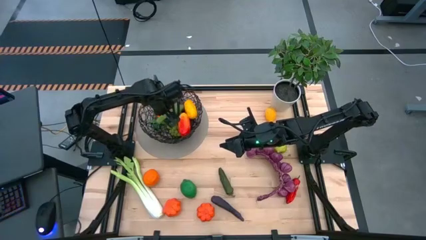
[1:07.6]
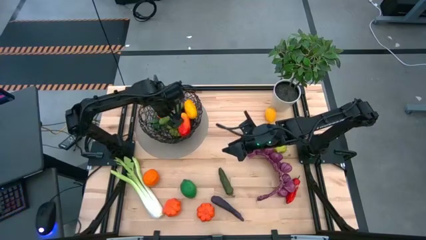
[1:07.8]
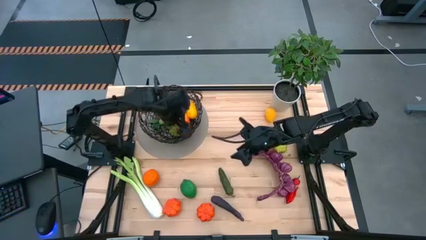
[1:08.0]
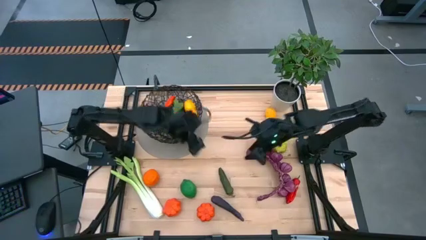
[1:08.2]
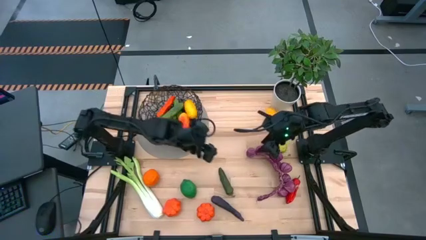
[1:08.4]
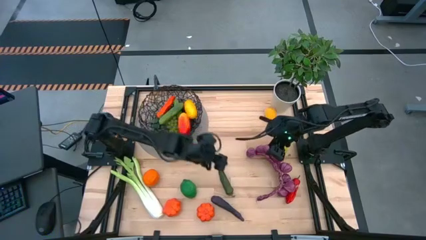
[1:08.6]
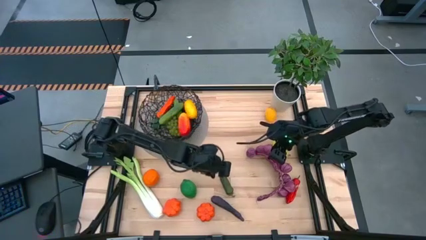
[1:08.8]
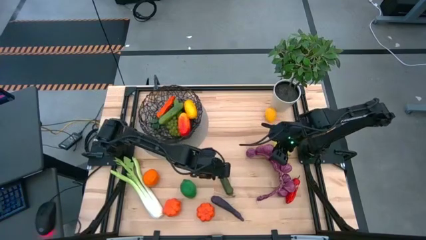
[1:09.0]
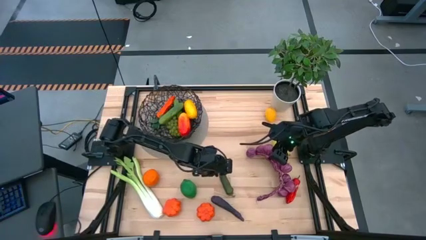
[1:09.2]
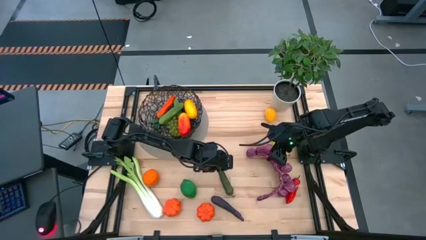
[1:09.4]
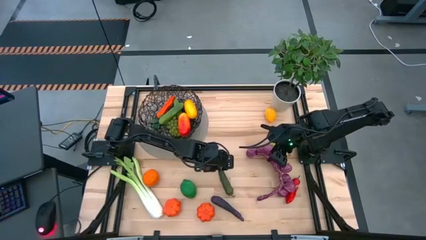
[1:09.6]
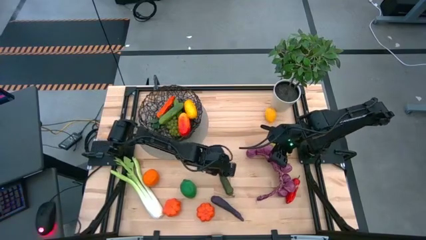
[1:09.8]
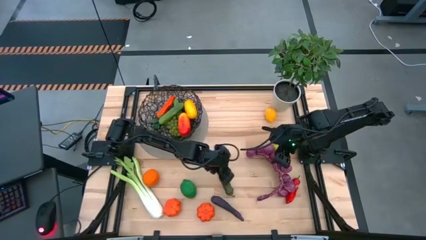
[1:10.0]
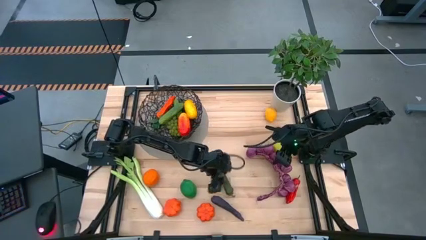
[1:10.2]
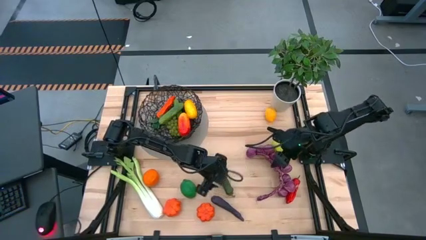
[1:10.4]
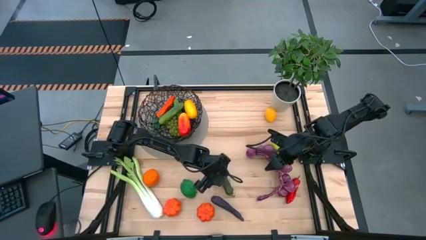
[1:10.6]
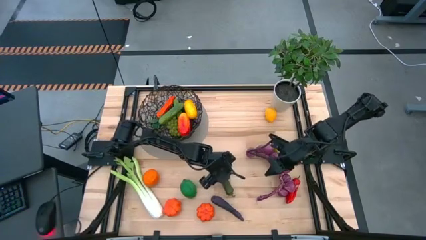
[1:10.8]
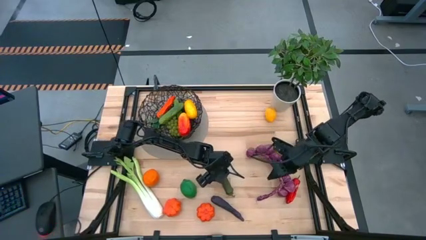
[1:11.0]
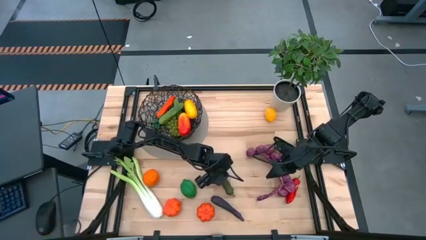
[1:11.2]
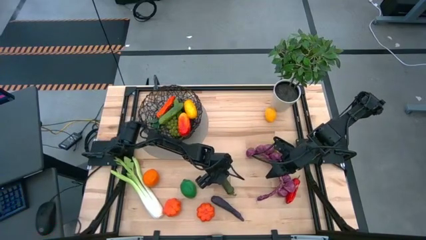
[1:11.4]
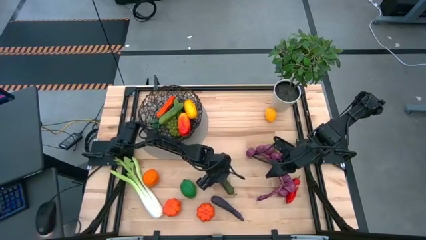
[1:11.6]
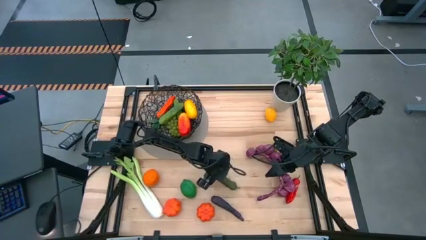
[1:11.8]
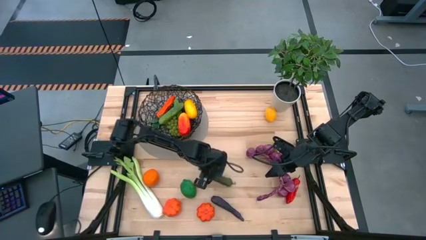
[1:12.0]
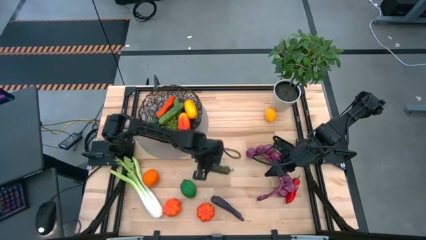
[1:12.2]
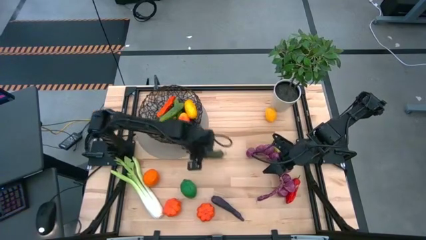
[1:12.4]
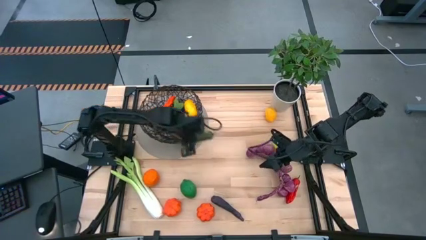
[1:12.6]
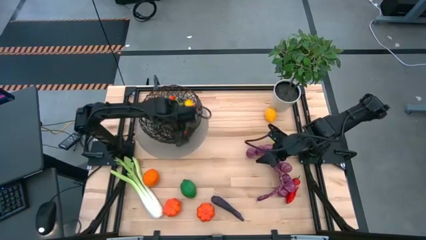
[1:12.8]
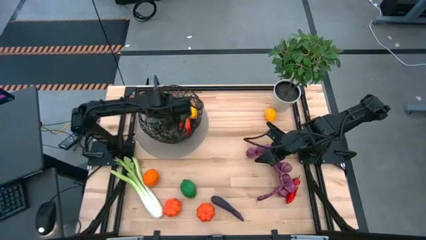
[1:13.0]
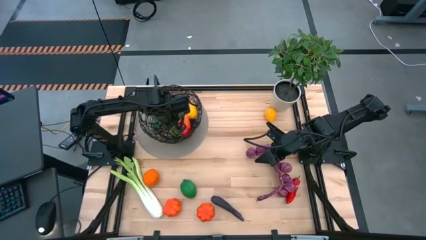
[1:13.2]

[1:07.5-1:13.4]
Task: Build produce basket
Put the green chili pepper into the black wire basket

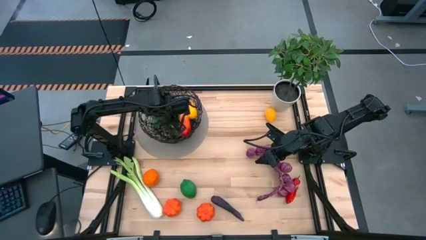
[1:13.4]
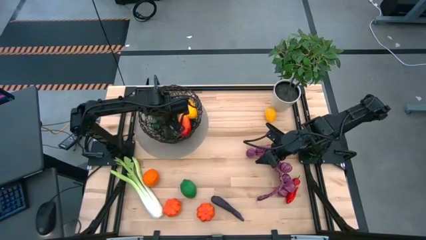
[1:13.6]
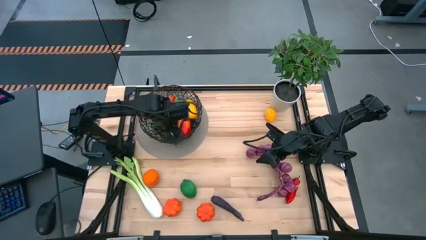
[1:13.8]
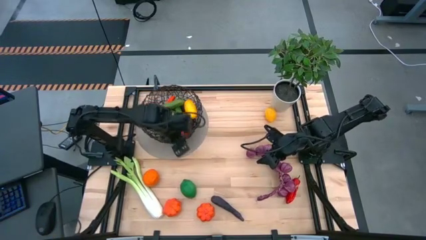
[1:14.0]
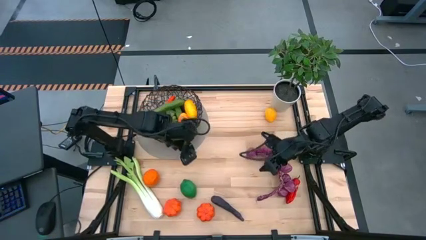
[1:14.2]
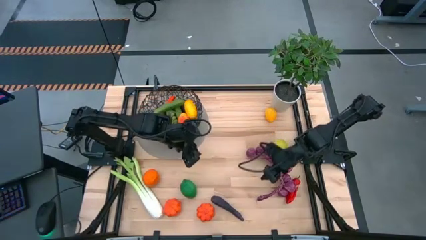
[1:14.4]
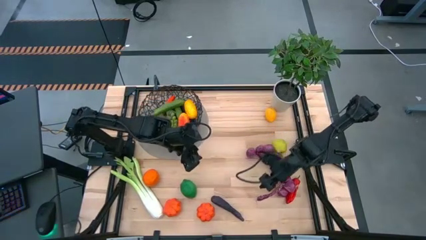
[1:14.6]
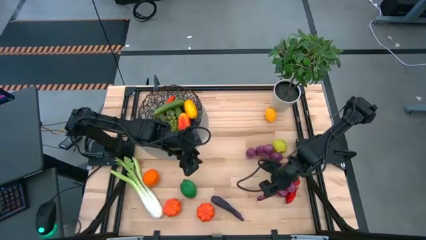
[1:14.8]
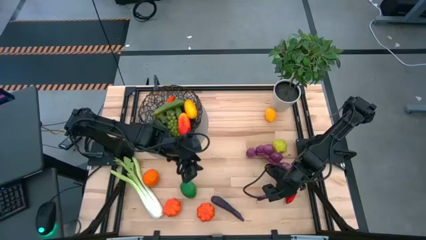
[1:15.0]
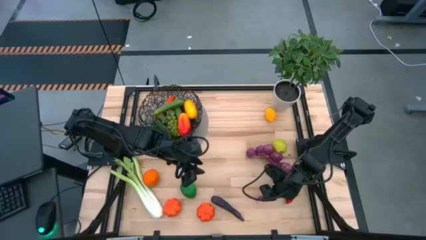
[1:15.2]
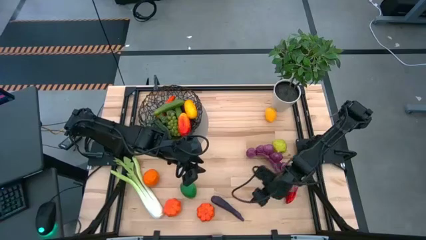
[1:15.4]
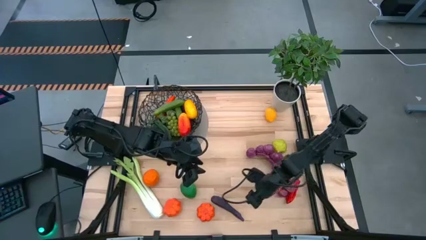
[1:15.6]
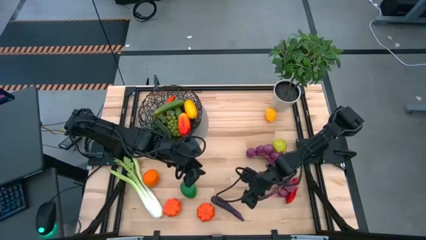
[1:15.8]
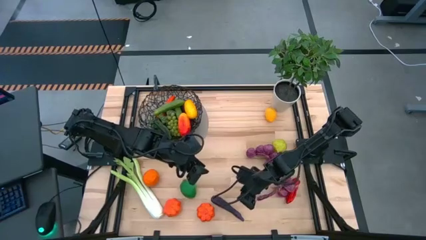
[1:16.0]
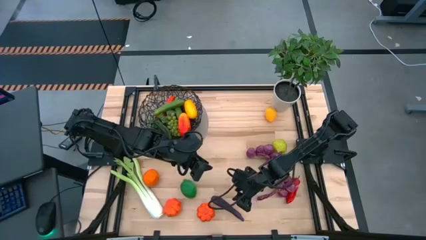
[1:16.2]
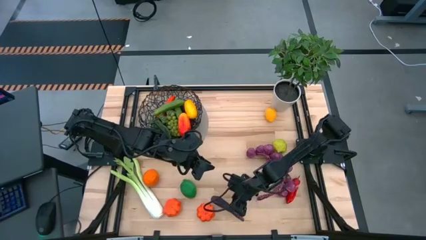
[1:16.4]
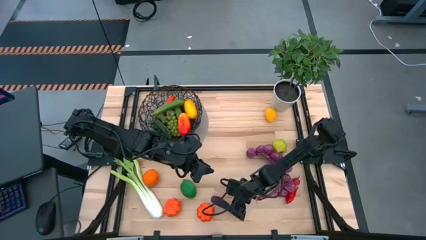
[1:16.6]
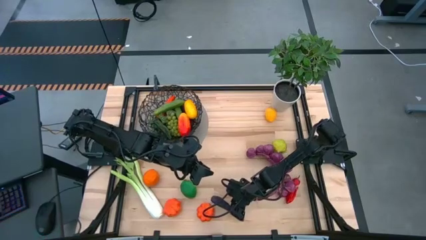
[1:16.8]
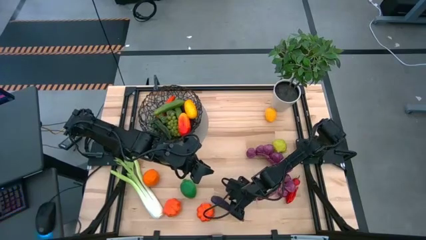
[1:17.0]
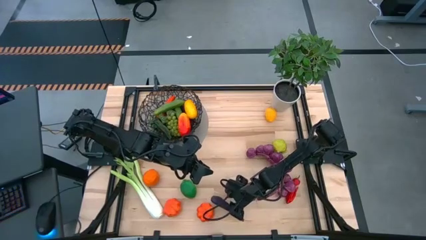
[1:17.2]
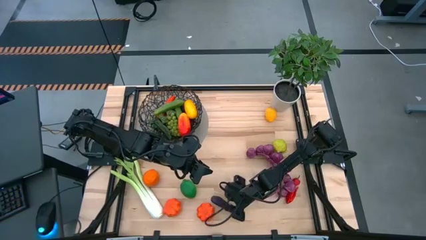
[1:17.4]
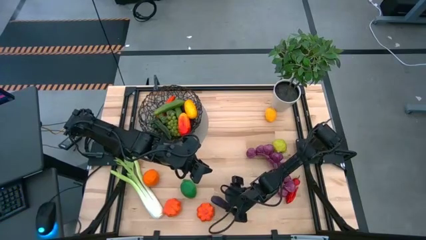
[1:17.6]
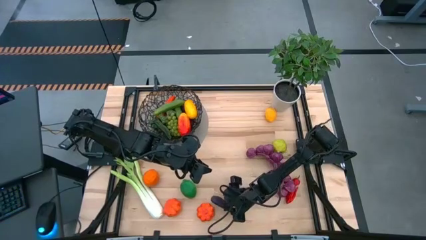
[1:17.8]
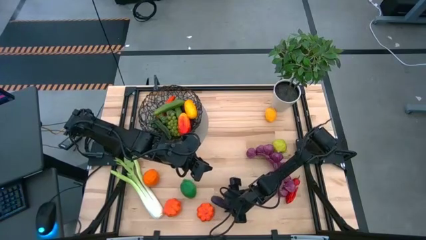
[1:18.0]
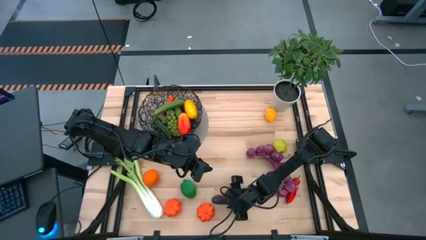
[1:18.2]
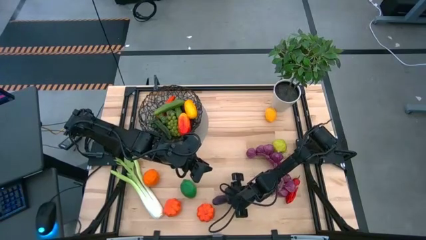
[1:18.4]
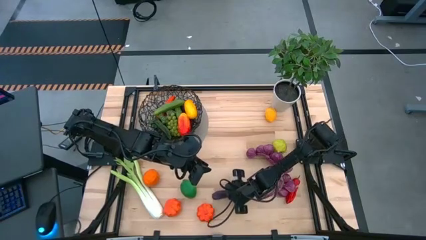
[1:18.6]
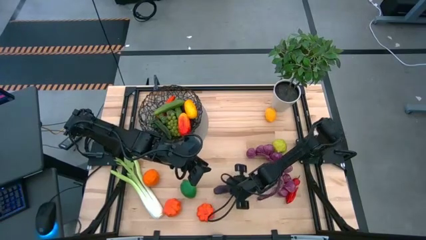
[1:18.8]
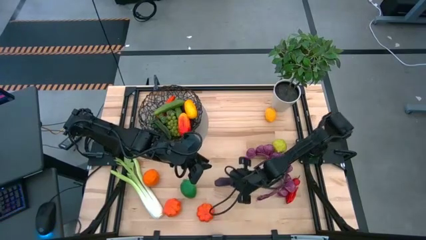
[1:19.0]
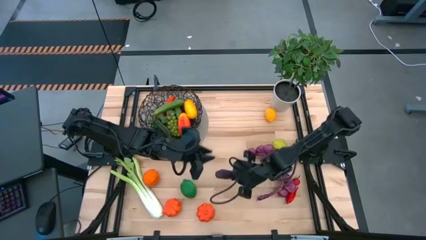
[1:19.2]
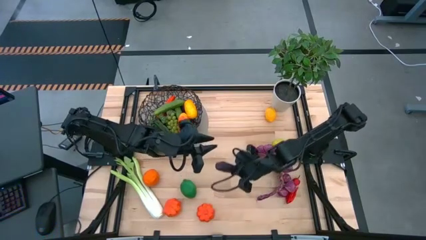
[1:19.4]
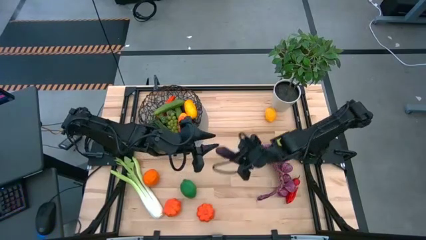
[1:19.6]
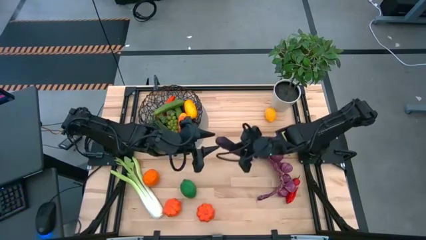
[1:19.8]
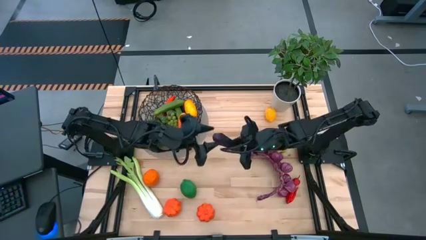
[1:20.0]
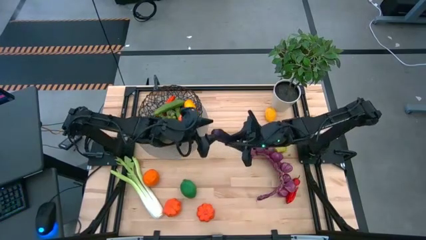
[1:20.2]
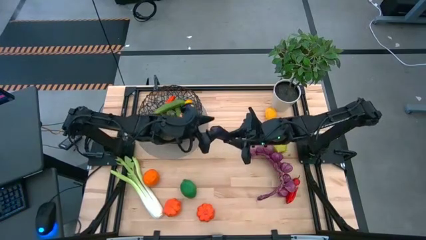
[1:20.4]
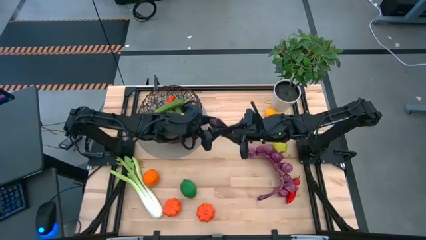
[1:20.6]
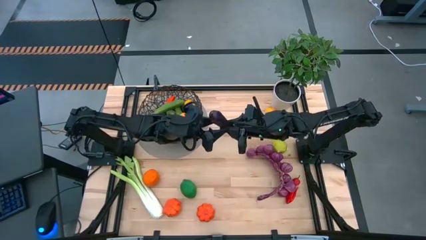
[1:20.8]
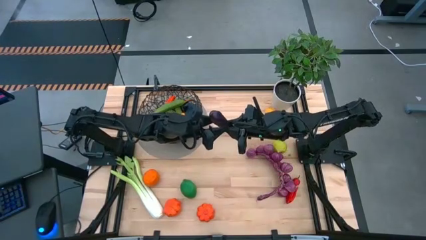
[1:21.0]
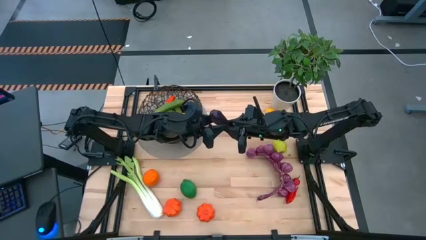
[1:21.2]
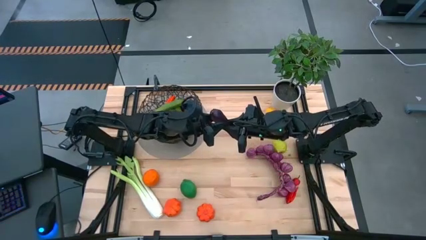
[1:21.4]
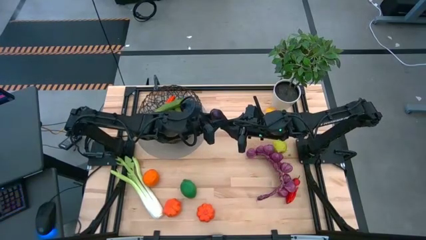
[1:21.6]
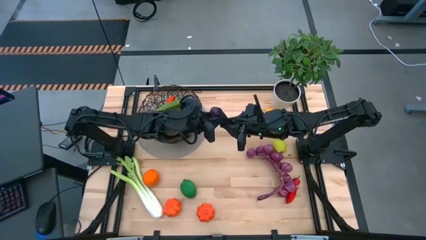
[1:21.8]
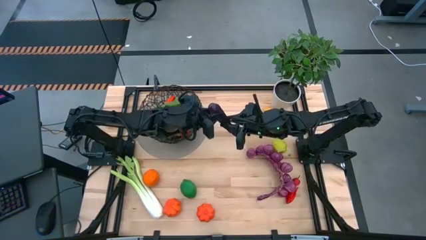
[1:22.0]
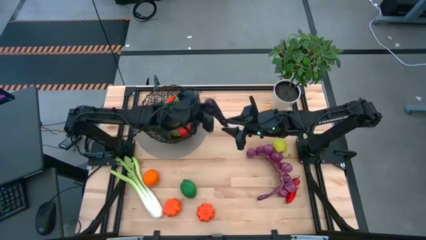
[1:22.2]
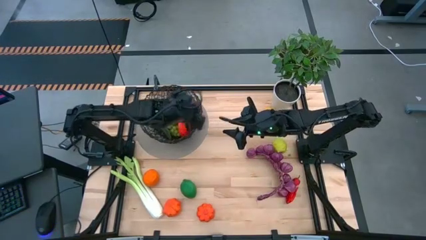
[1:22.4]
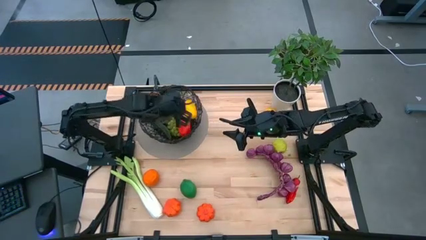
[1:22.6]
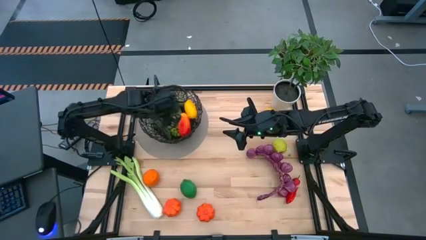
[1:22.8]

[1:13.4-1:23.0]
Put the purple eggplant into the black wire basket

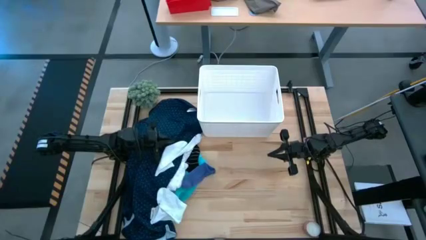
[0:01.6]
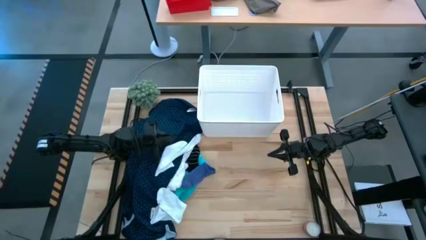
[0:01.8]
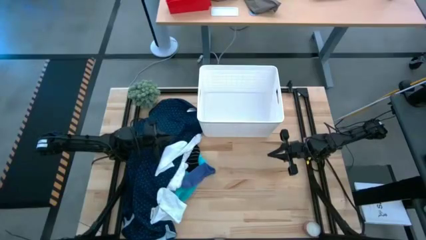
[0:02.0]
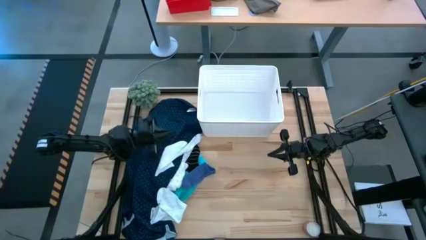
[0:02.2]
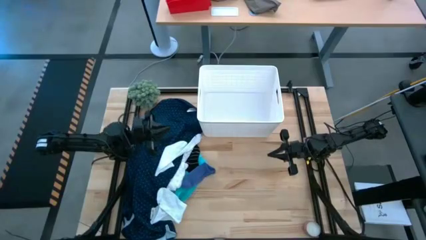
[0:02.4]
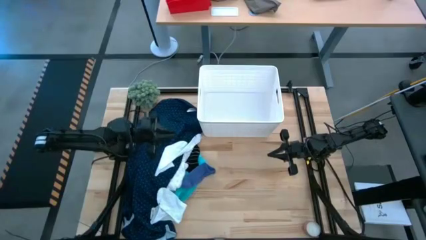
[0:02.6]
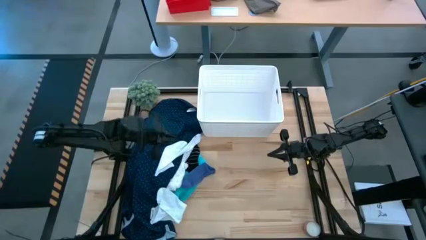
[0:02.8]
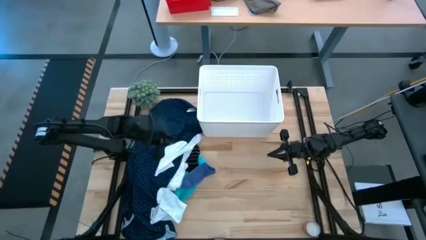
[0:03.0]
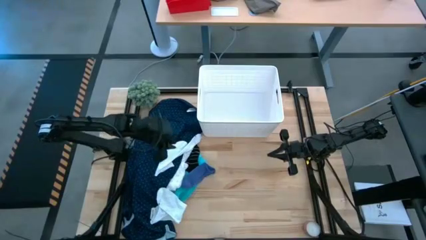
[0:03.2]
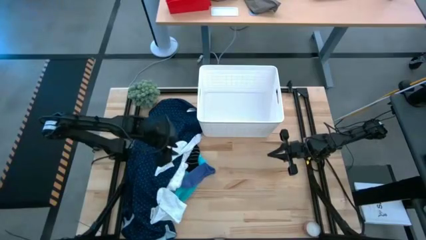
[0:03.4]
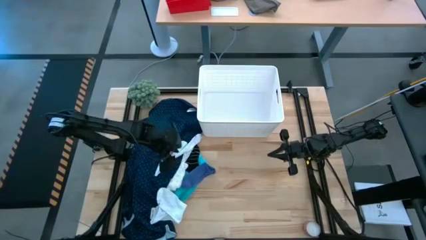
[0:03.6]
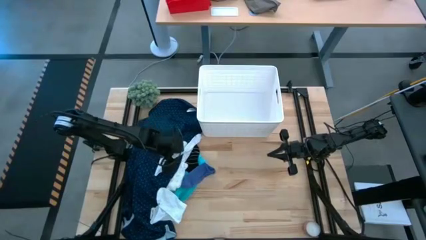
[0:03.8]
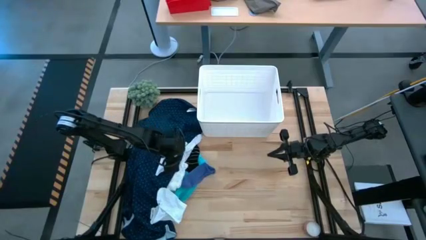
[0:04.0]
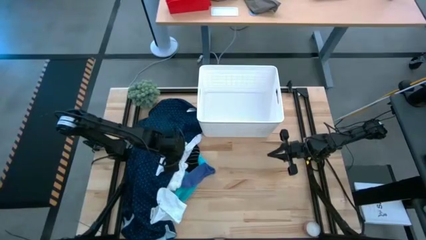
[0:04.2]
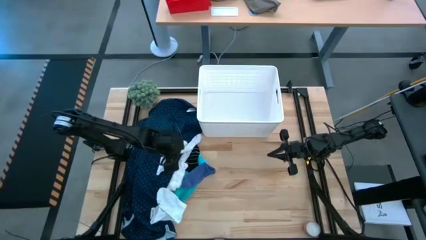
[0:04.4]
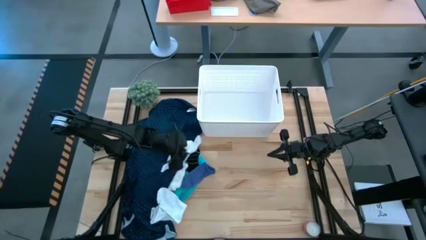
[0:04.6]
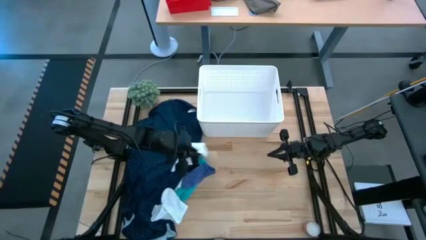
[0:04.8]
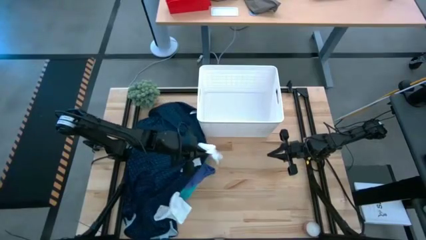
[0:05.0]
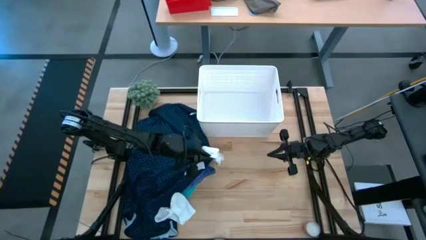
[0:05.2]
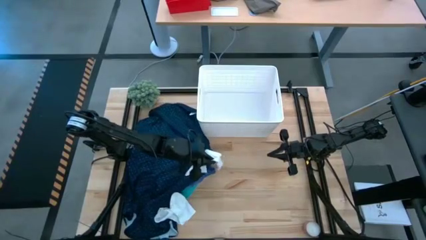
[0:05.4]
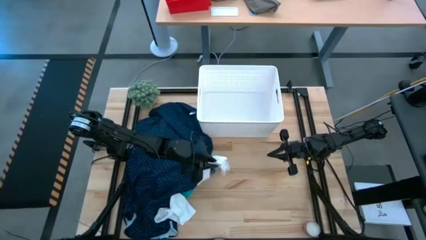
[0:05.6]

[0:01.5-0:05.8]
Task: Sort clothes
Move the white socks to the center of the table
